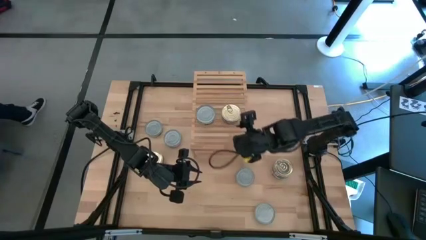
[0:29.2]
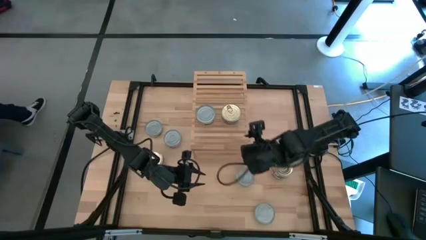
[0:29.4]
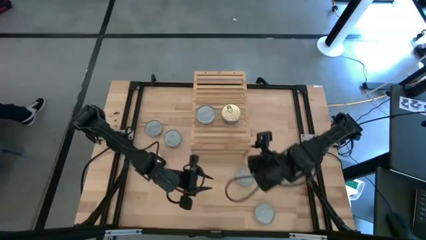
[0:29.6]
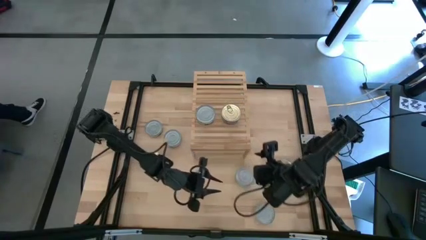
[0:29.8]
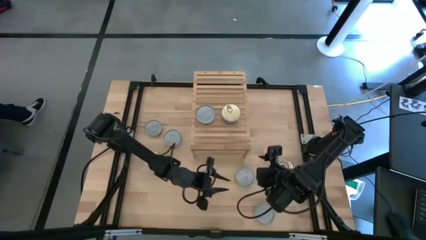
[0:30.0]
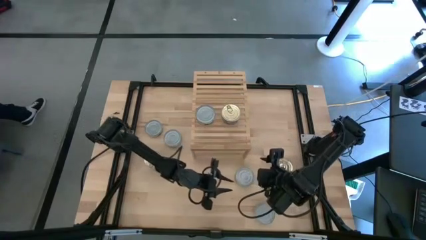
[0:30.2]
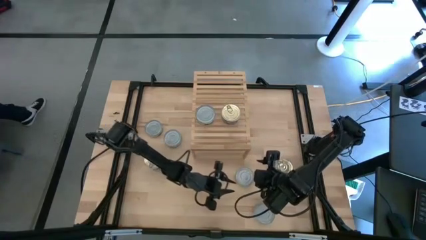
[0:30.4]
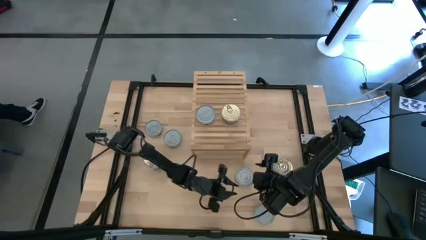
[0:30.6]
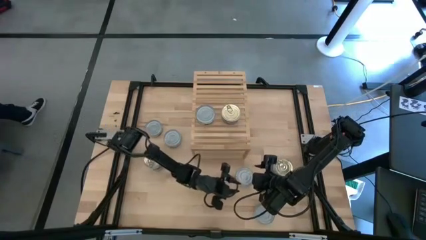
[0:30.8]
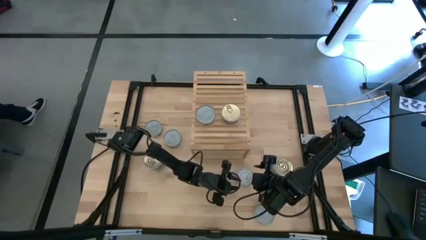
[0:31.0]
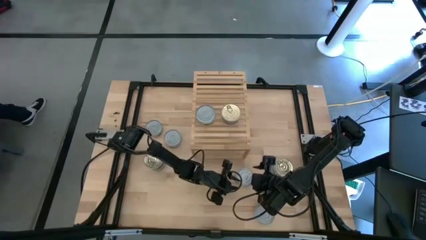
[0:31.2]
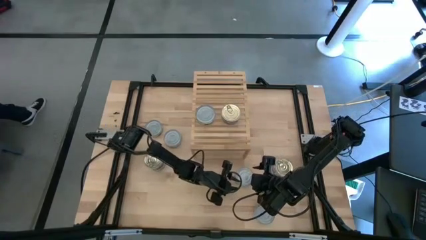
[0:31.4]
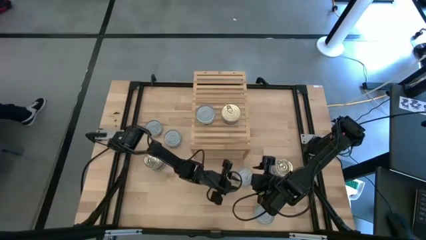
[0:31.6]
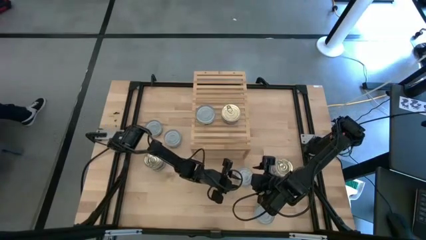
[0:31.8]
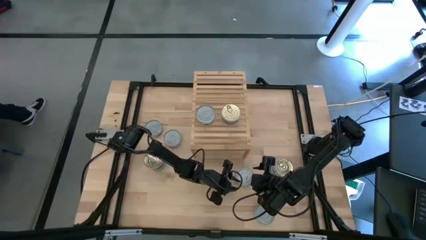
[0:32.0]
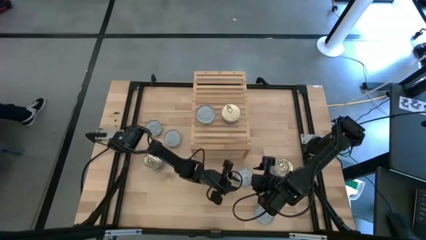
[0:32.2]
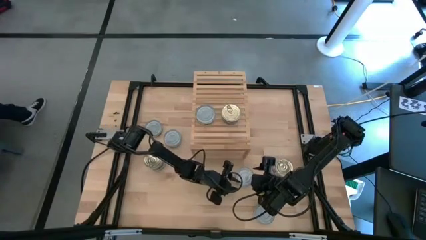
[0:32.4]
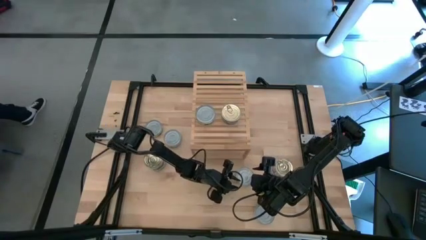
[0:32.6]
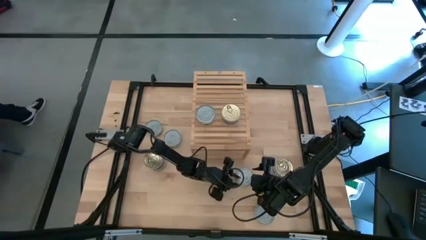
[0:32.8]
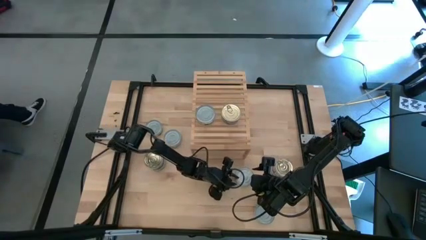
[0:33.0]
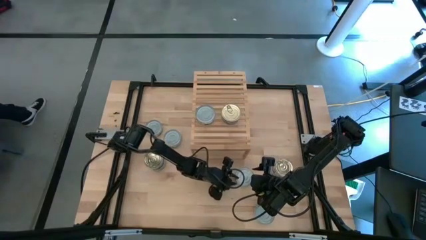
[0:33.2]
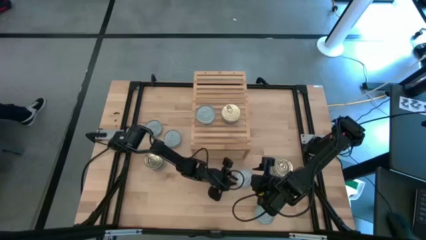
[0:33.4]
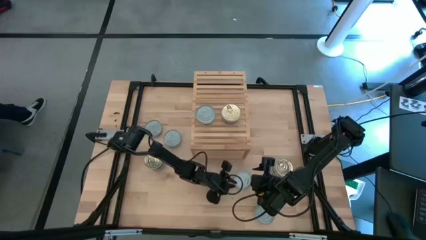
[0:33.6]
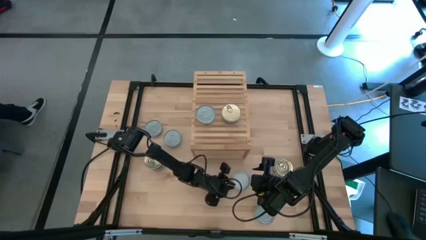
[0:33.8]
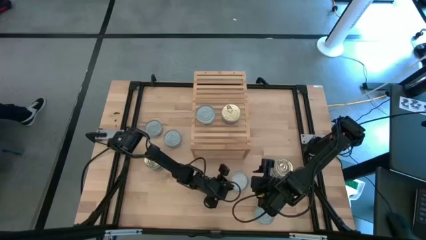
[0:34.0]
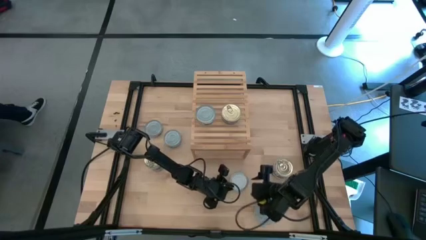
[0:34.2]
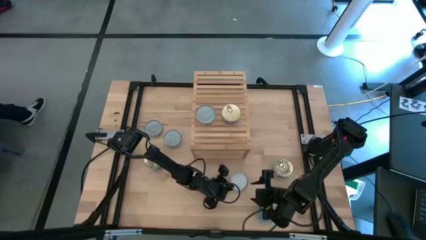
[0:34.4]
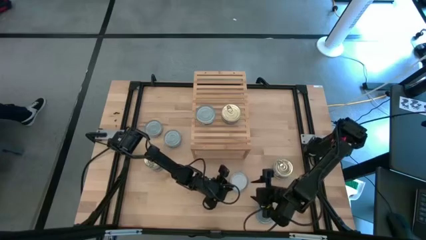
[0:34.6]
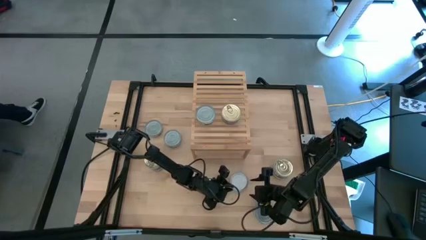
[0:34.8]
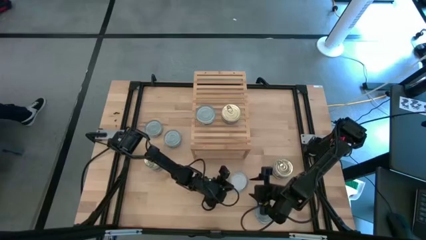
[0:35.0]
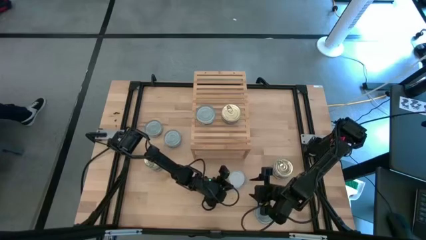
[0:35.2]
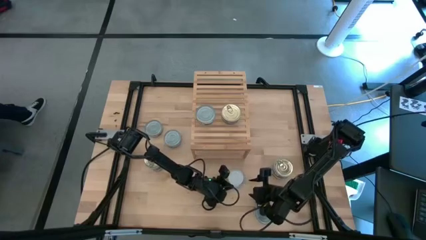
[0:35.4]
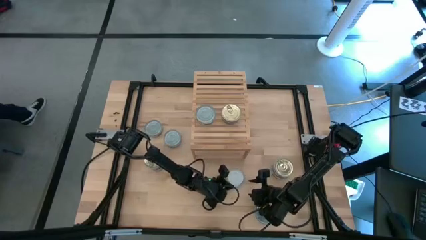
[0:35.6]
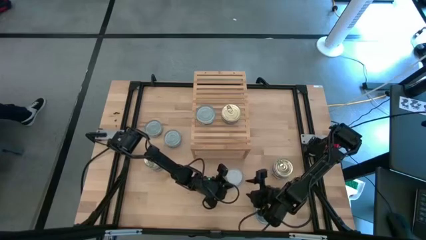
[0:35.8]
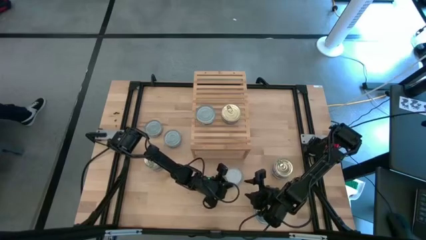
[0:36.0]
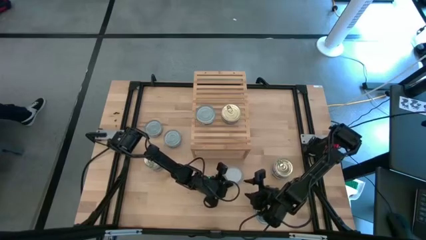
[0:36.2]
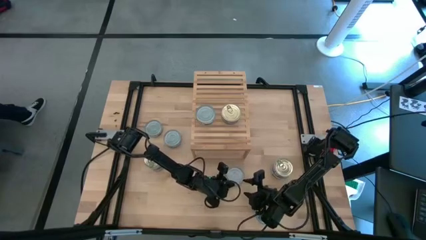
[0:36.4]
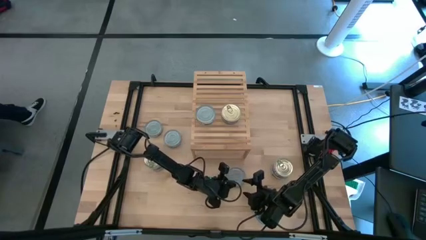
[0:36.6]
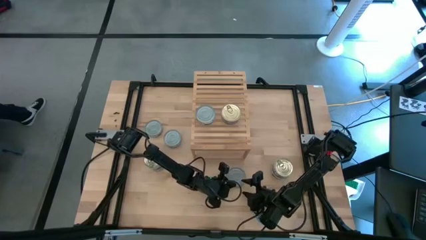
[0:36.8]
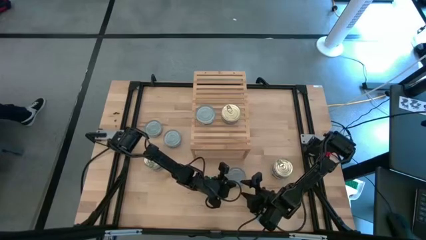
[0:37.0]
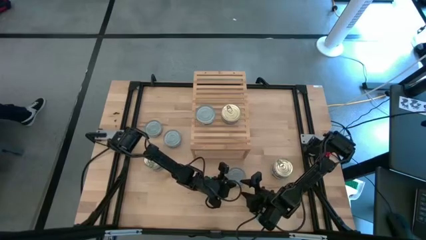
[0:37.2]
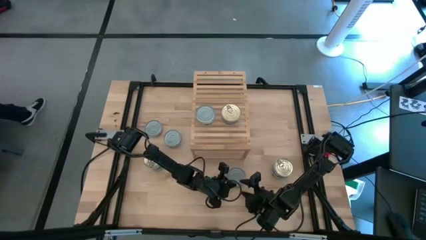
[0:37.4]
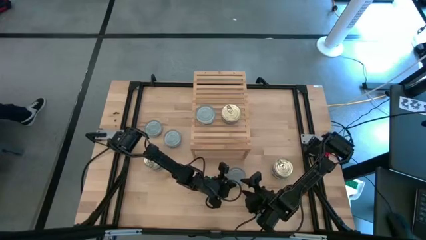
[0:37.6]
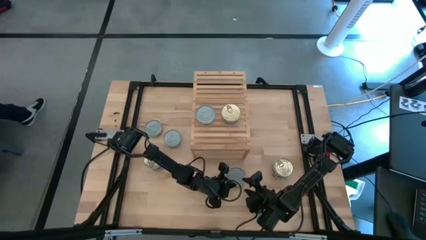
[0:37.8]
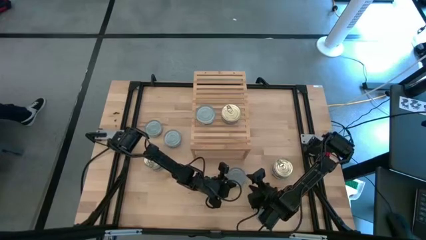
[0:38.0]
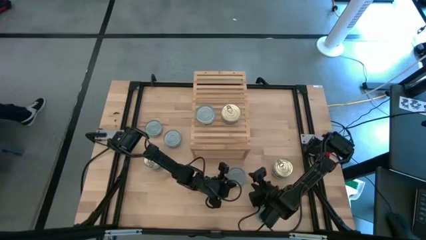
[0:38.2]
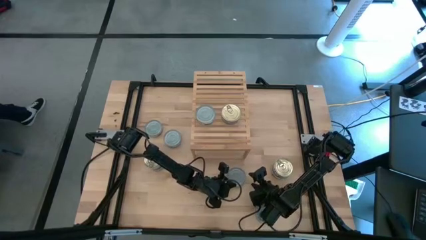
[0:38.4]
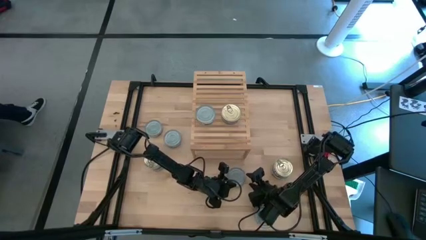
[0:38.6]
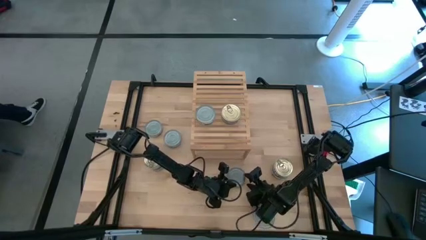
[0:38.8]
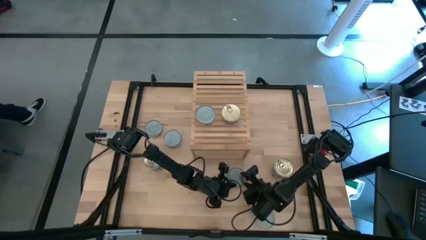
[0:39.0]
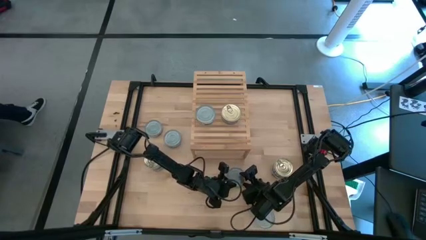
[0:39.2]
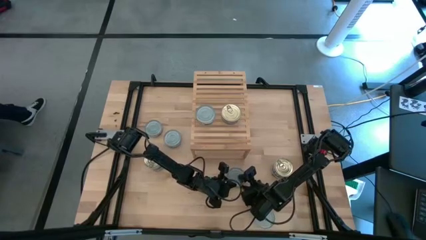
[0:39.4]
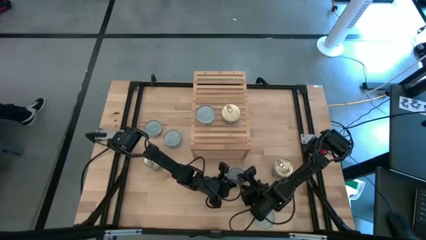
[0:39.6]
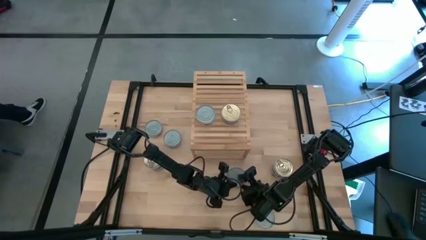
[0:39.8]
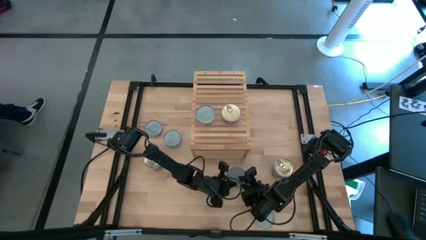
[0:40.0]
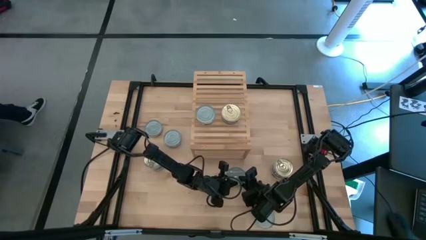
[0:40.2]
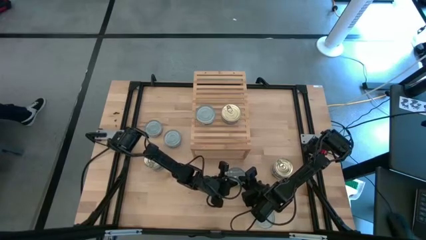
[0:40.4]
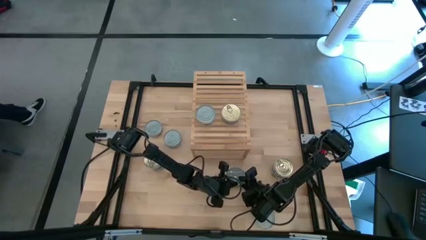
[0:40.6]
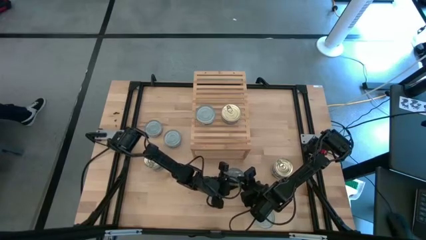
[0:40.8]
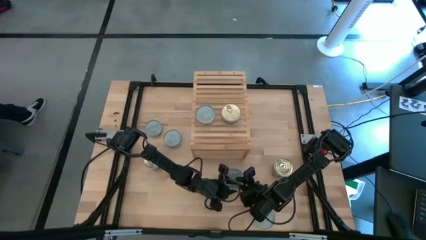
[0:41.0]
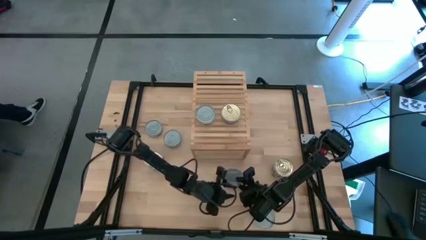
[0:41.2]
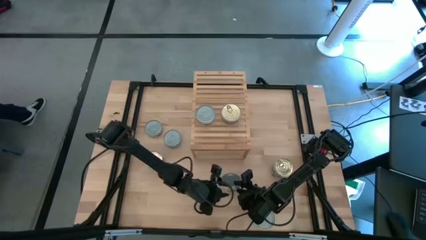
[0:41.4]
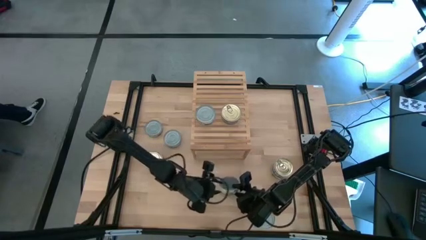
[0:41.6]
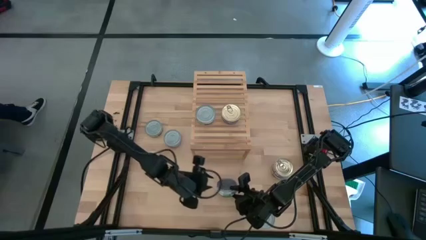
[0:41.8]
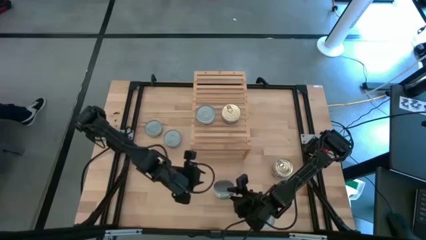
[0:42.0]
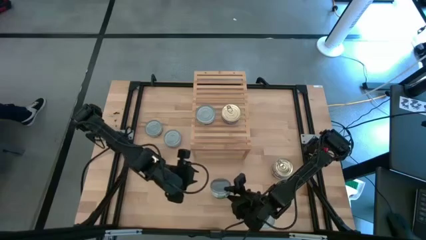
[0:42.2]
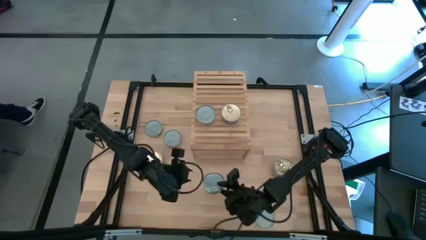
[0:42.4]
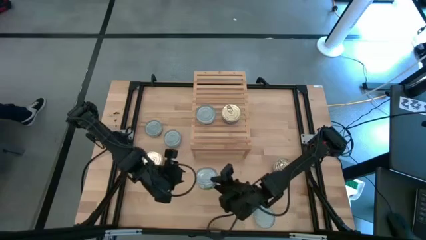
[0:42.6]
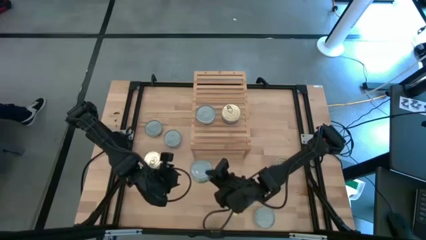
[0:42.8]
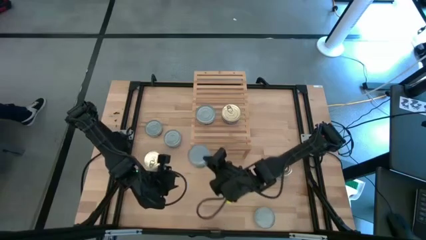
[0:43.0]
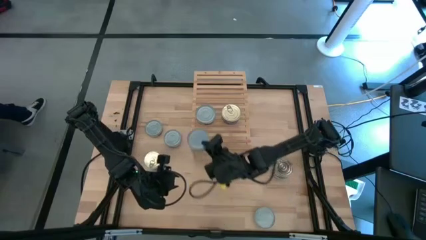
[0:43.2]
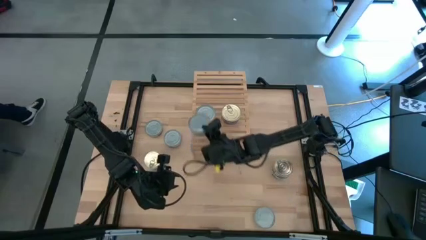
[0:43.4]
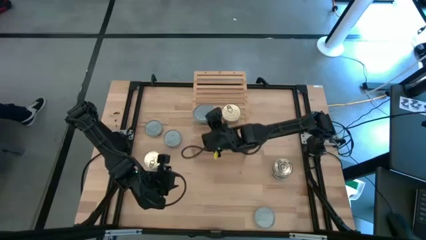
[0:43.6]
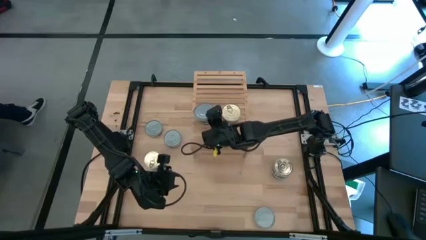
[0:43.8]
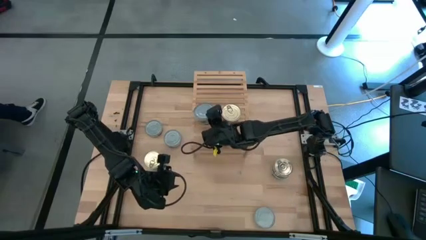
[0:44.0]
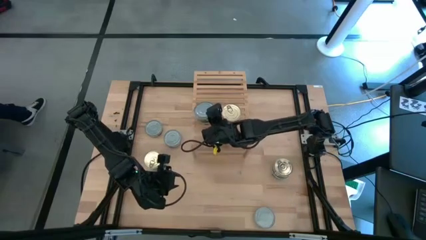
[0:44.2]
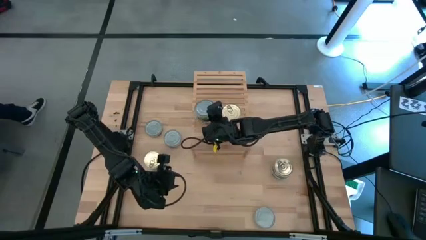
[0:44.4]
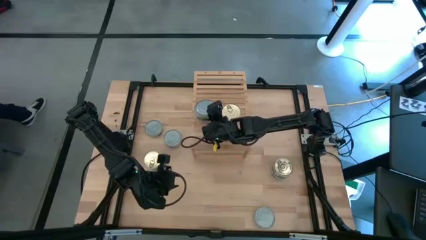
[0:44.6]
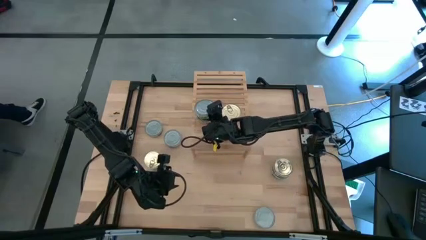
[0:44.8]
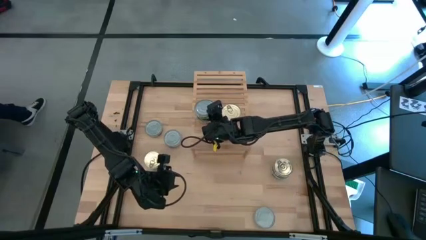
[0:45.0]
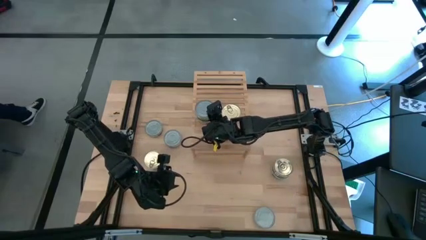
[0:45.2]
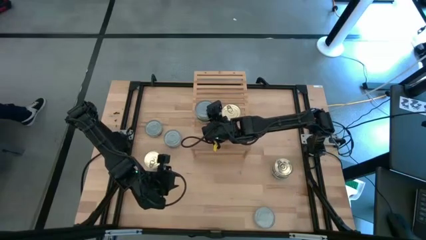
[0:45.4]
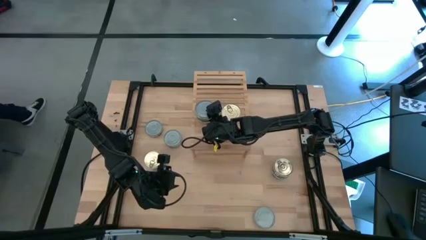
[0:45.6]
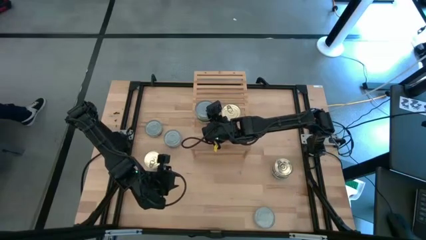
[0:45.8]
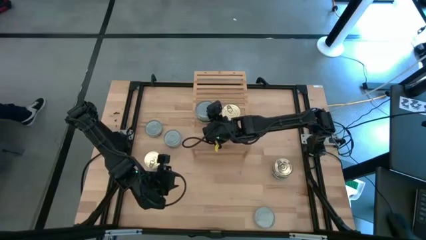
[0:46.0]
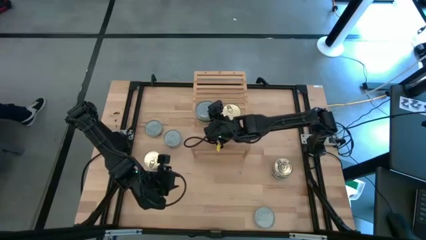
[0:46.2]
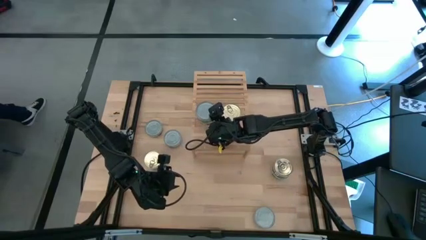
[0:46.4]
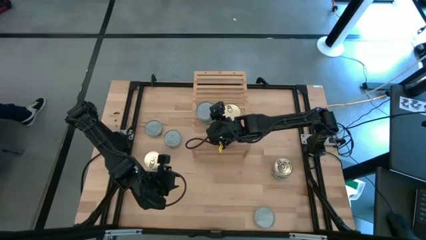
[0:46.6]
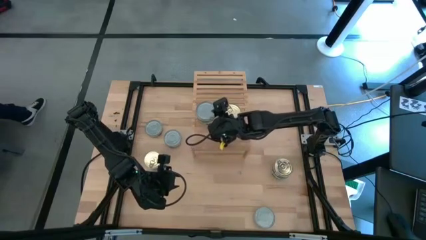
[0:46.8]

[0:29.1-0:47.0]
Task: Stack canned seafood by type on shelf
Stack the green tuna can on top of the green tuna can on the shelf
